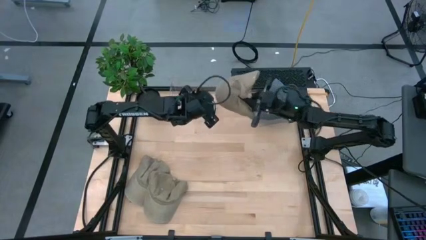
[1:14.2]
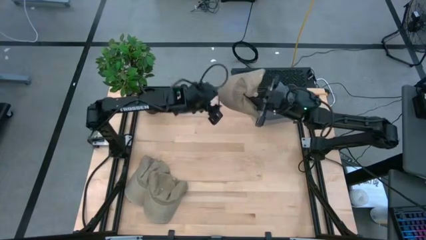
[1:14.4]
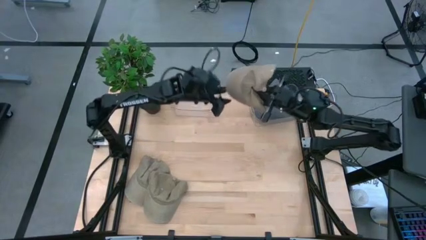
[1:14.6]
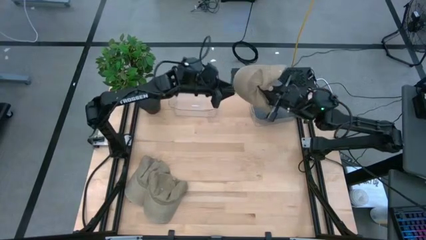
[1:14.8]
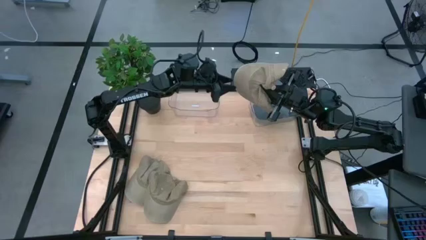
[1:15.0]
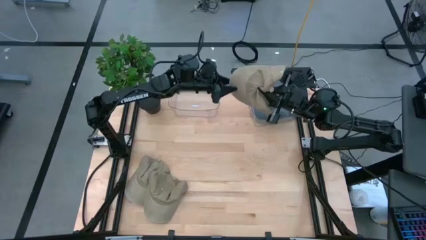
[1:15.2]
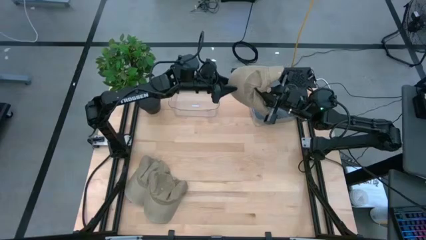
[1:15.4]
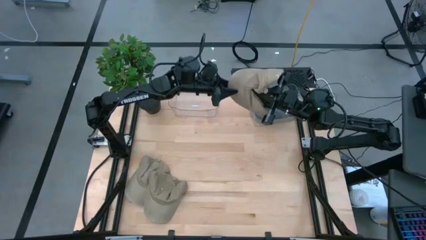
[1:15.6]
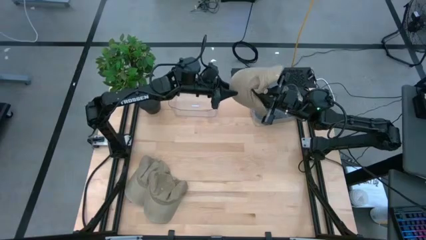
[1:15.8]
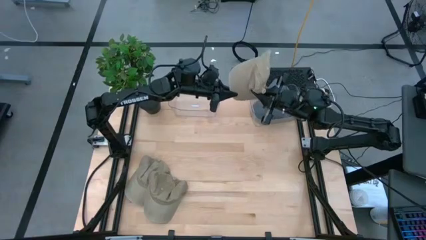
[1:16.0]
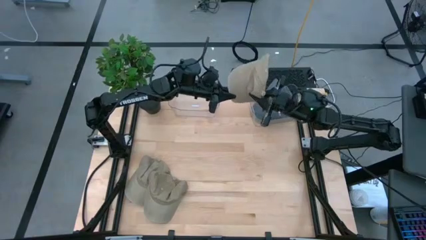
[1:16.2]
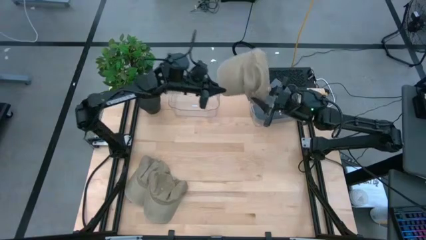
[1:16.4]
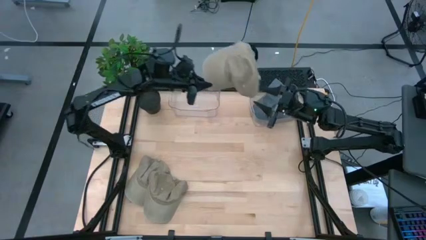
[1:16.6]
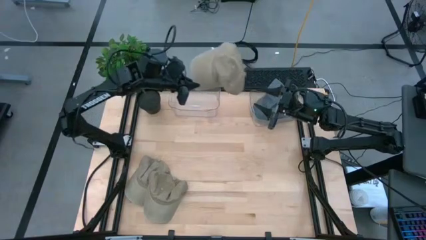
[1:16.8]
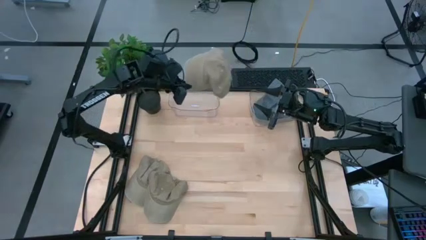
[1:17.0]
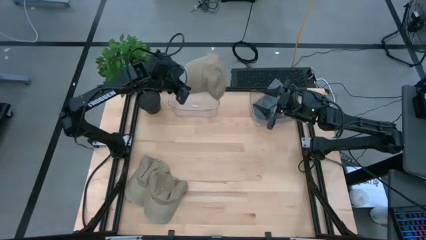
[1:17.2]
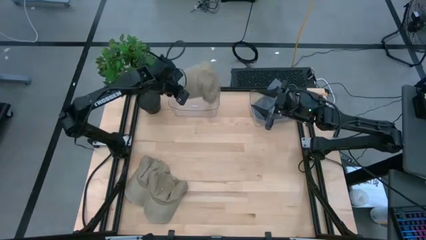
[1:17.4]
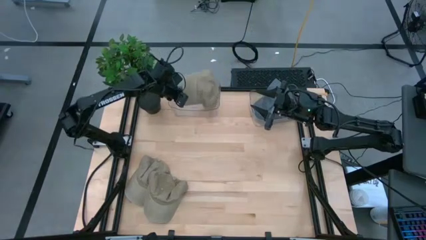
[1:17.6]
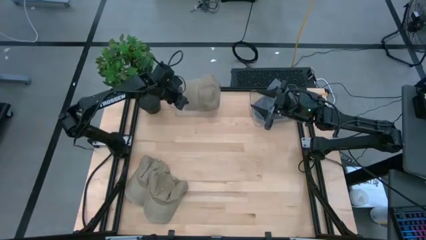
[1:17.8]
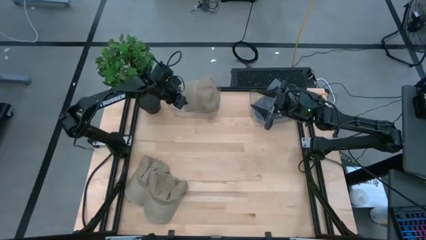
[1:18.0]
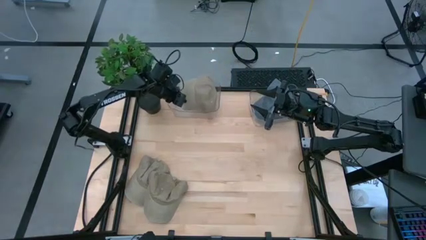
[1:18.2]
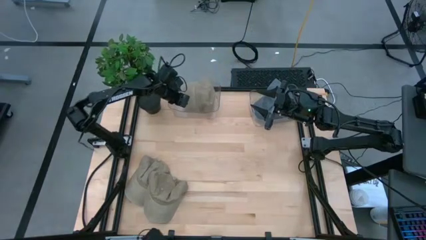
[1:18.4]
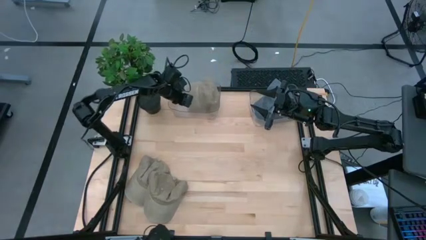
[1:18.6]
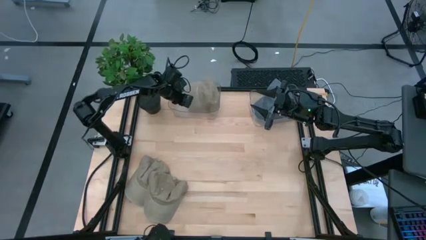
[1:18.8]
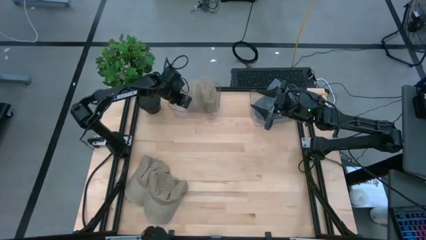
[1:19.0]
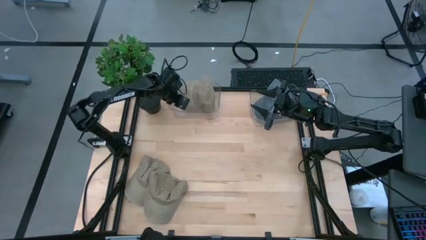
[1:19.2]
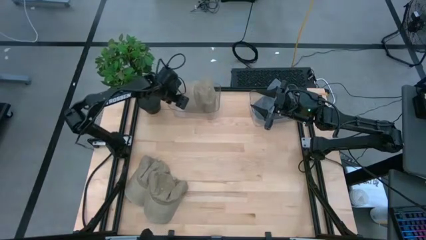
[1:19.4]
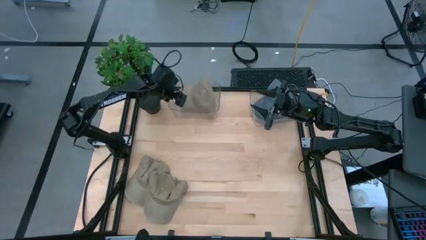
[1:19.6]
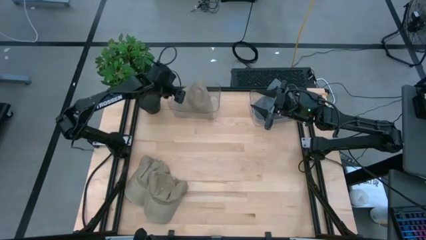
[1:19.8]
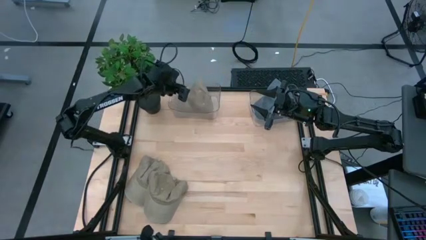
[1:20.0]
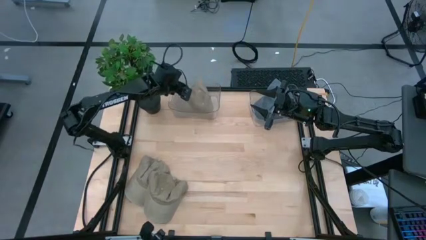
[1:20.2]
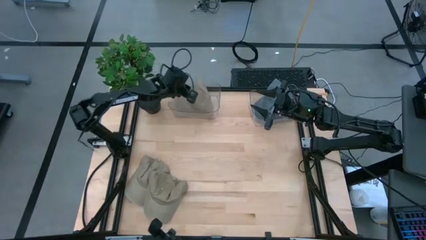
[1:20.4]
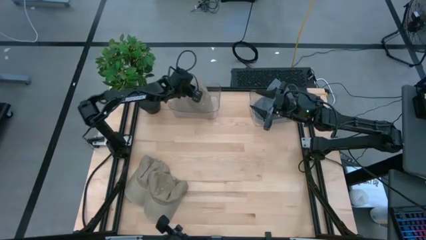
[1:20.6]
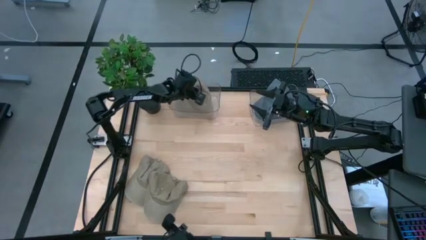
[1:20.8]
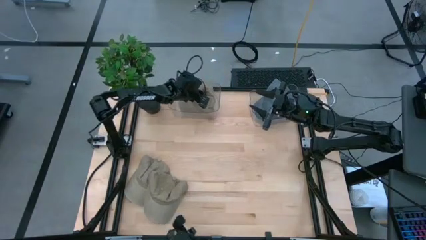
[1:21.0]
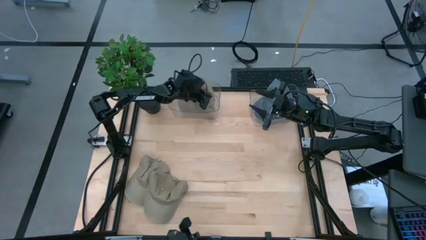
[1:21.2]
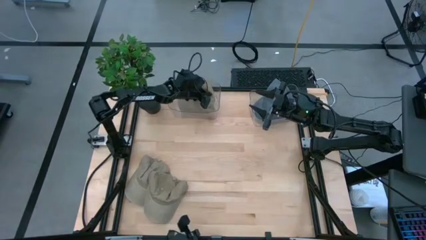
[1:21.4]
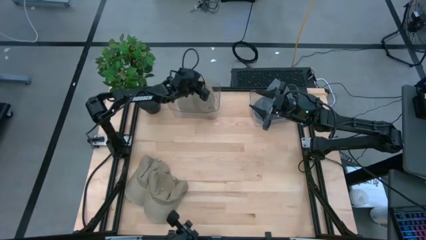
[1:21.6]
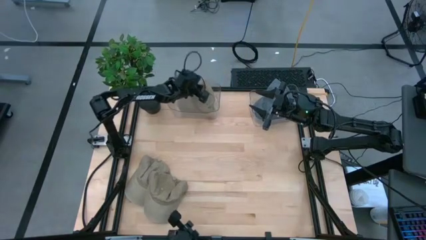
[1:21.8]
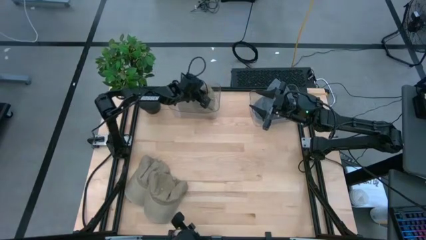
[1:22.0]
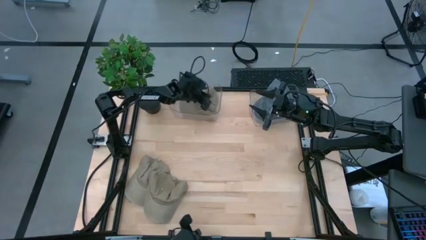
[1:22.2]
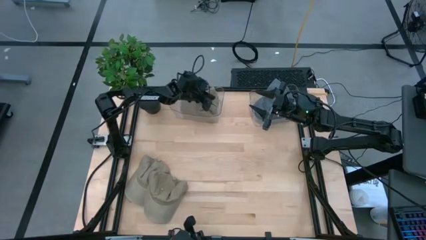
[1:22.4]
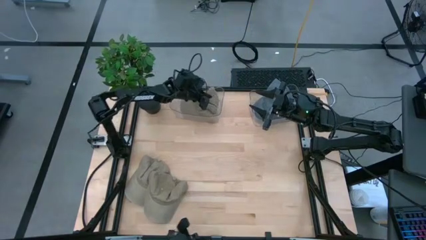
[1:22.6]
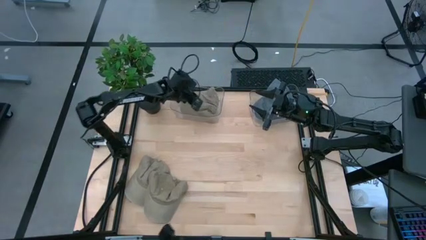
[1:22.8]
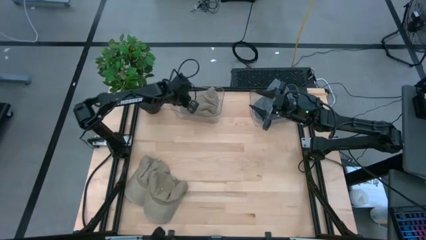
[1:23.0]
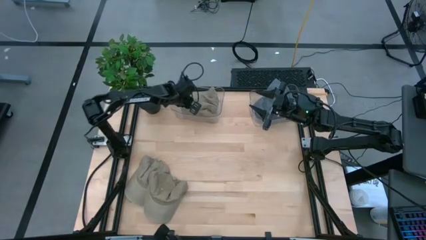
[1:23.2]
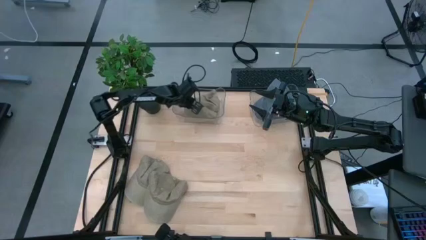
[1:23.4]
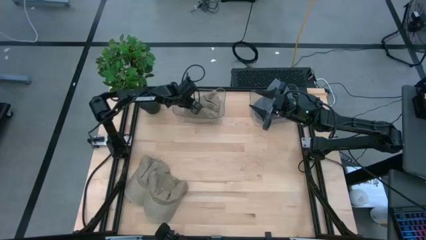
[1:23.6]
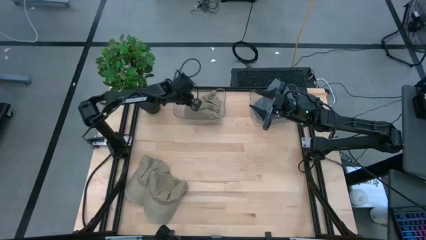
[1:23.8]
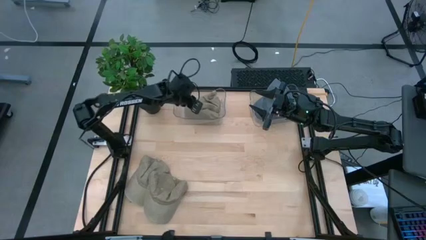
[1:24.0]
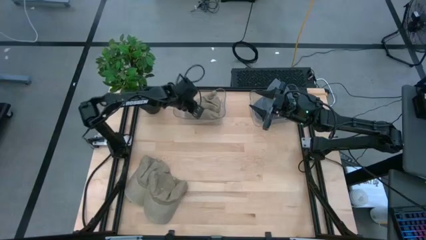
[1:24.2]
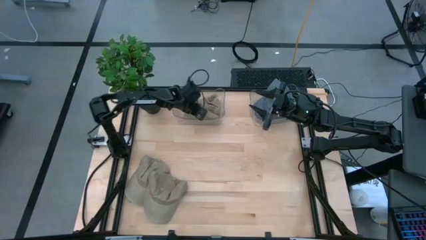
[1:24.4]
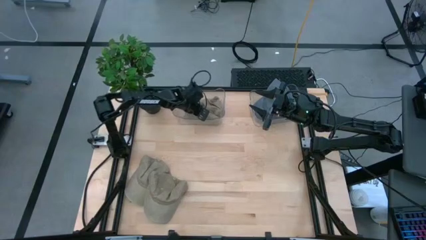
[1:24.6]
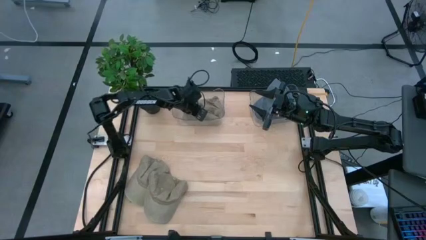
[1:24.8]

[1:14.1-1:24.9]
Task: Pick & Place hat
Put the right brown cap into the left transparent bin
